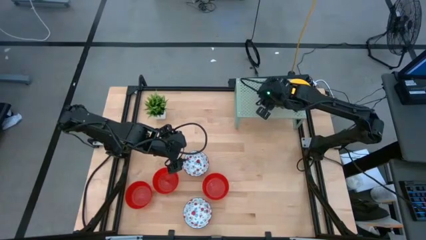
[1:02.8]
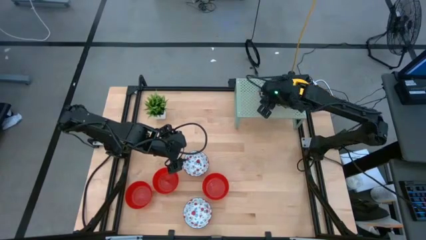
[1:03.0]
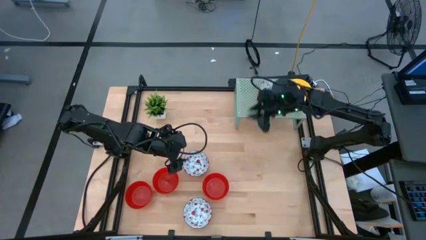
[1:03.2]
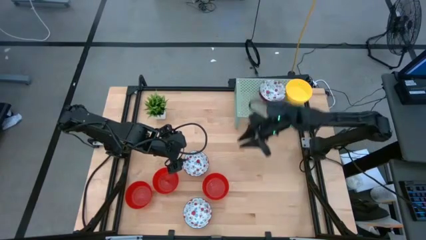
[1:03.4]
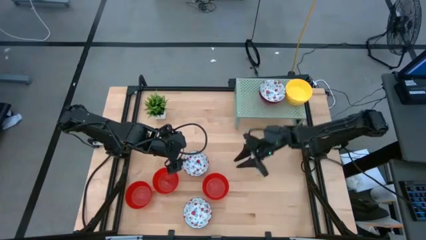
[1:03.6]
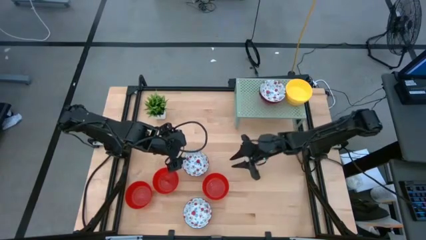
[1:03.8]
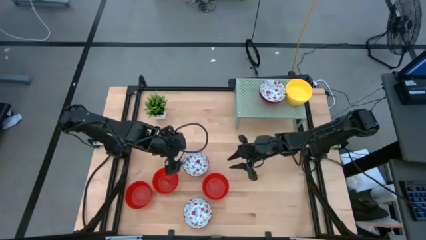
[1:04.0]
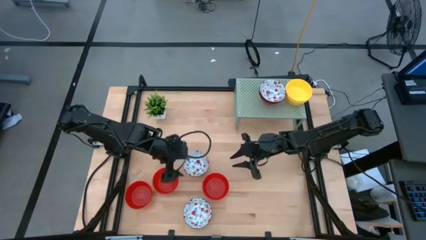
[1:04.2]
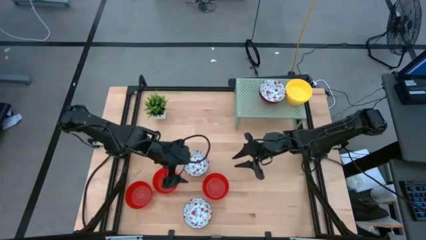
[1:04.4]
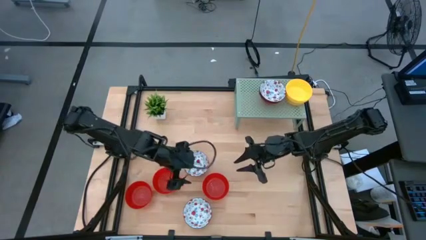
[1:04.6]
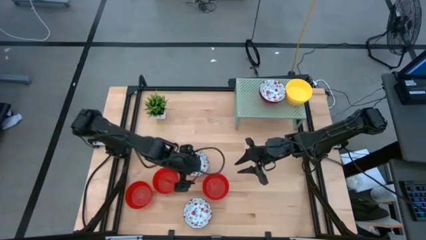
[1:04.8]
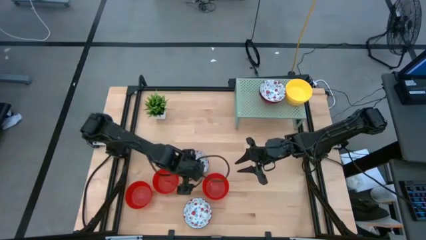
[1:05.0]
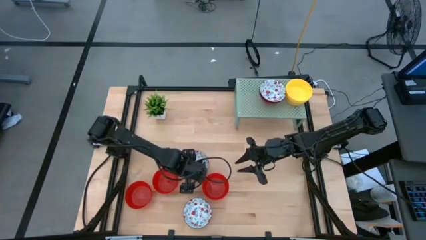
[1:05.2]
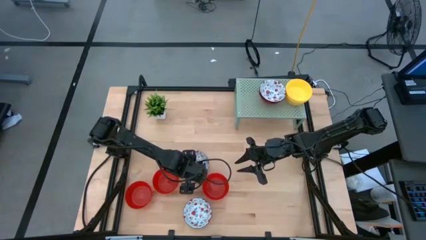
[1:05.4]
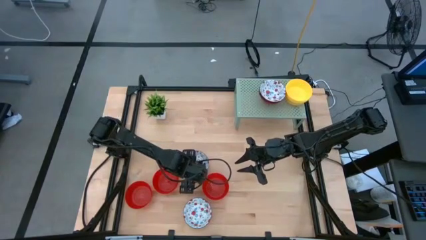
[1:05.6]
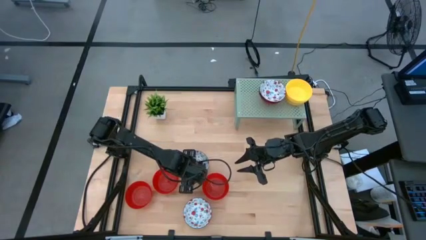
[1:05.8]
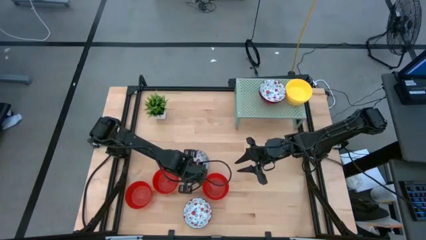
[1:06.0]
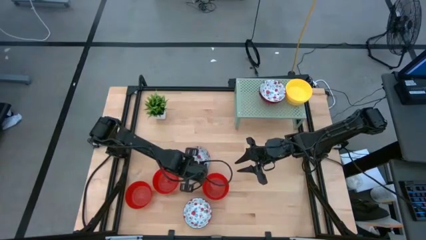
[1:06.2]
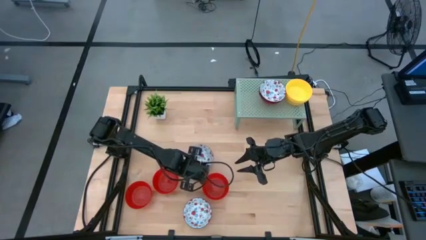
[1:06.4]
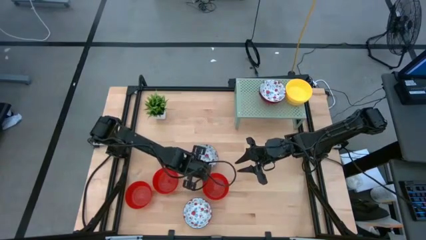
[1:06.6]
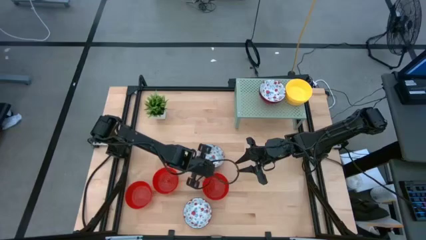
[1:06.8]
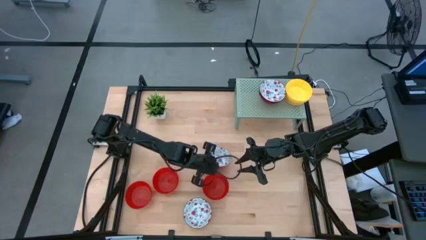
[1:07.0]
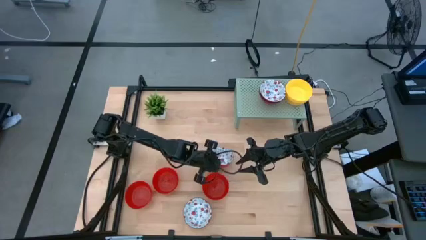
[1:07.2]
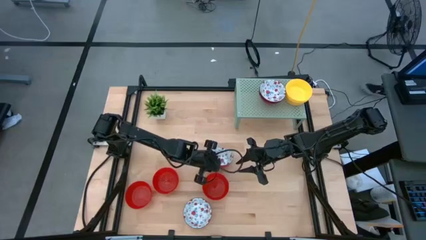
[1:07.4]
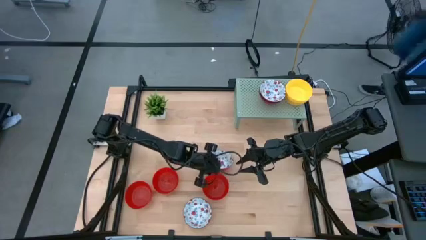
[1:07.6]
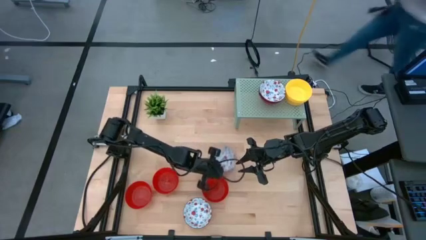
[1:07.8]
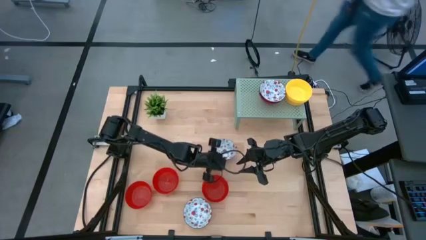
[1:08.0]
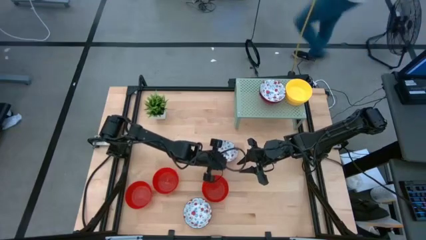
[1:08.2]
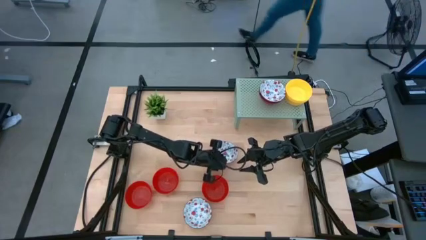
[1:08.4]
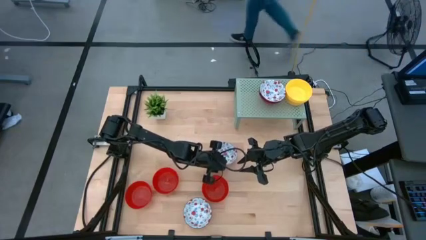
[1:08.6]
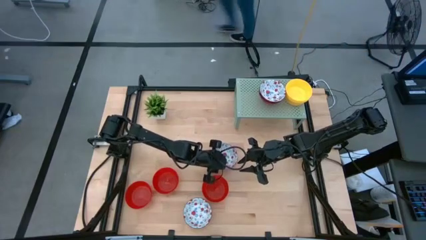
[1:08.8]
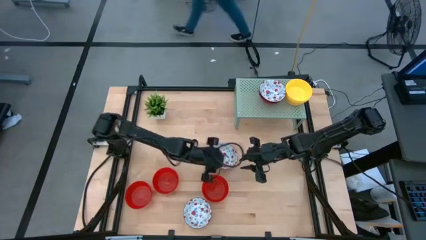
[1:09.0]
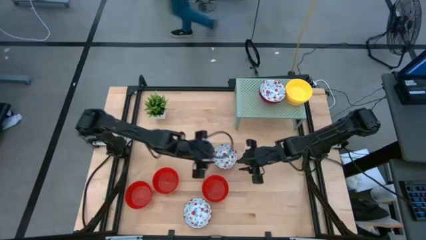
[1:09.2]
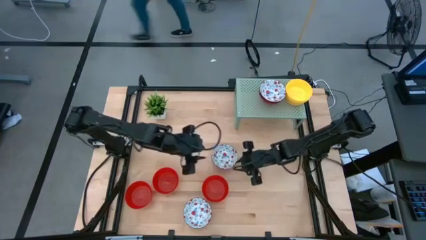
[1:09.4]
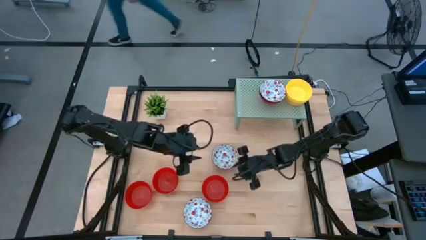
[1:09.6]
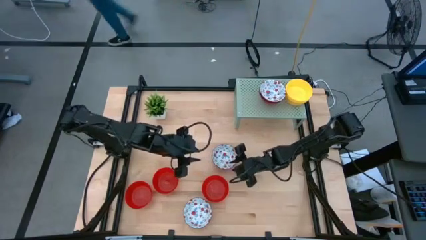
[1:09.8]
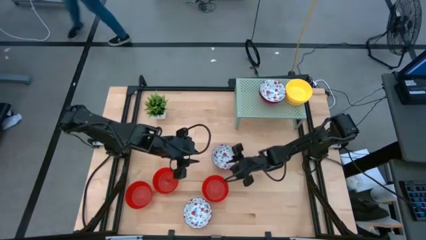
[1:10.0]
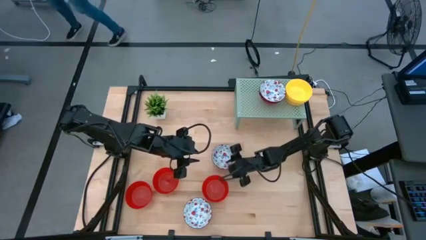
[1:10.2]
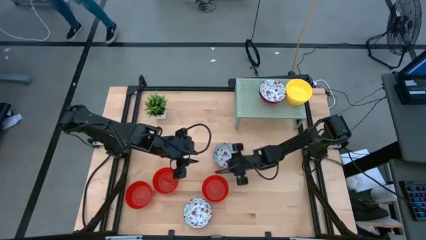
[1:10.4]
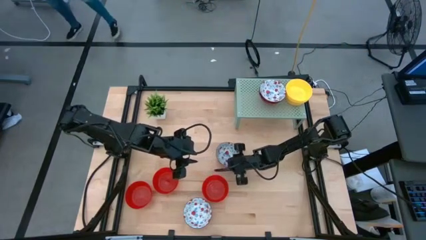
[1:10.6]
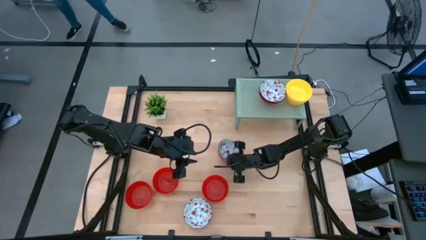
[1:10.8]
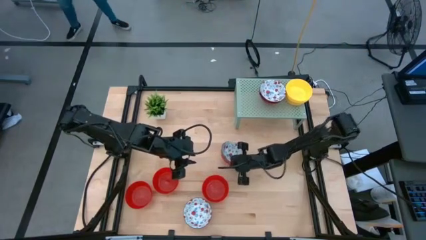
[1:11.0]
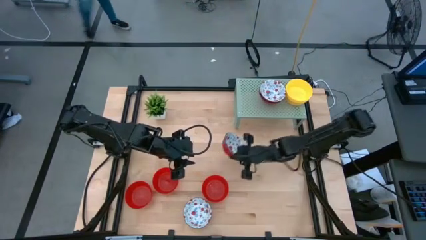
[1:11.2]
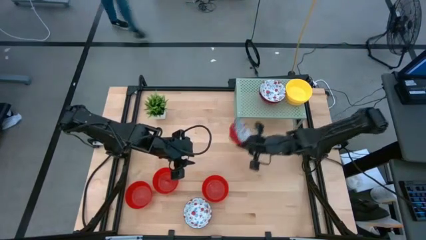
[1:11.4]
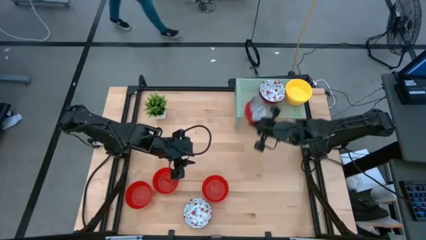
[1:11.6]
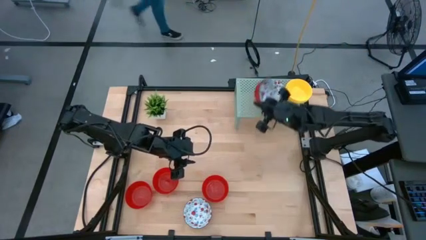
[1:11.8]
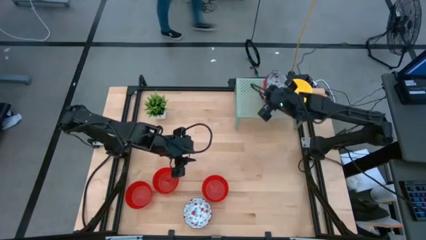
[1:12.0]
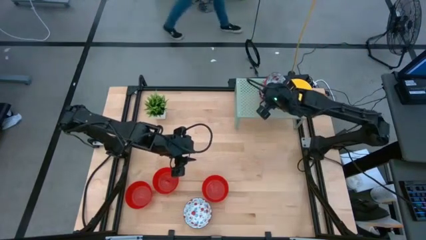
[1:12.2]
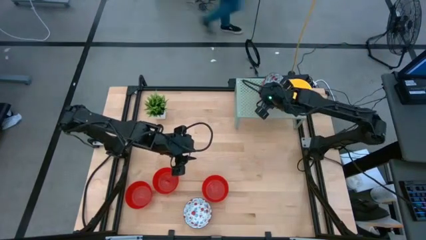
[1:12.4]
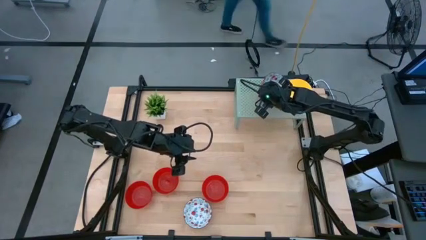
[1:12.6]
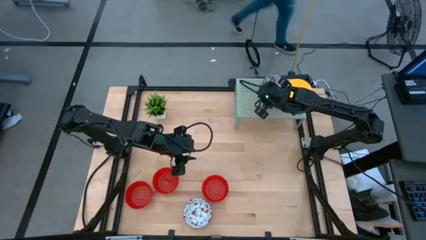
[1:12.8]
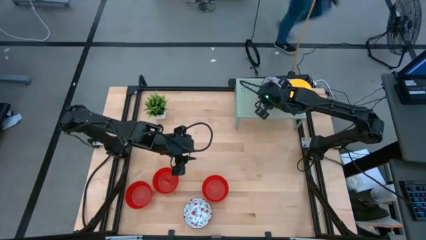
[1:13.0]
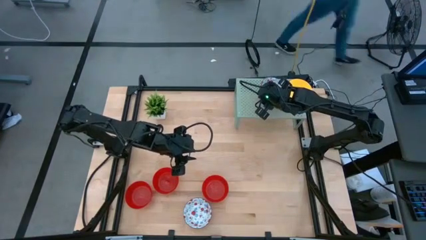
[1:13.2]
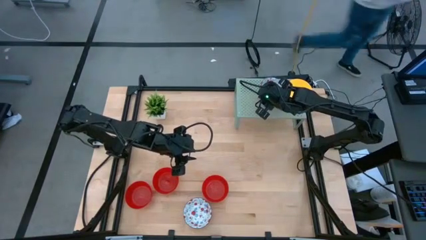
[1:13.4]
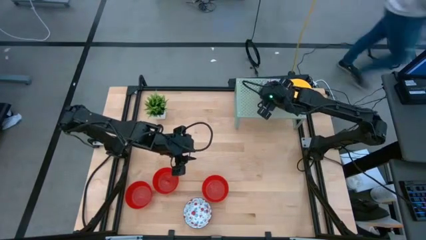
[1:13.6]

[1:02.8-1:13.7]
Task: Pick & Place Mini bowls
Stack the white pattern bowl on the stacked white pattern bowl on the shelf

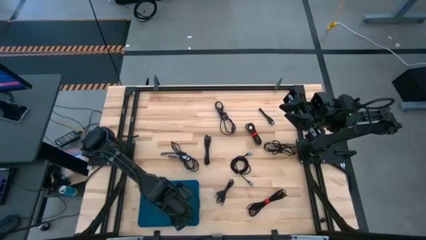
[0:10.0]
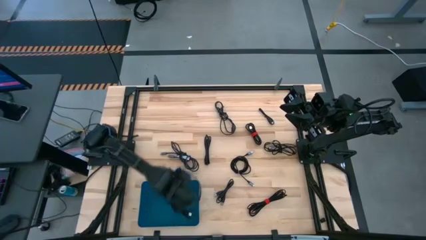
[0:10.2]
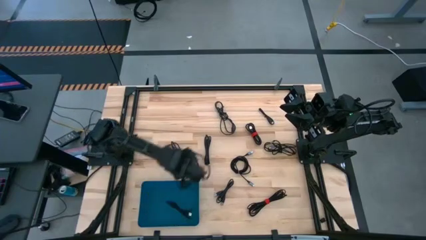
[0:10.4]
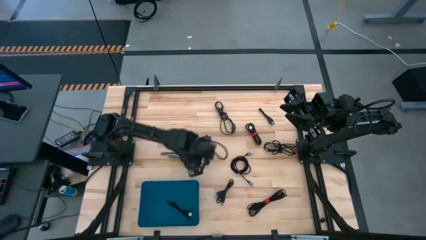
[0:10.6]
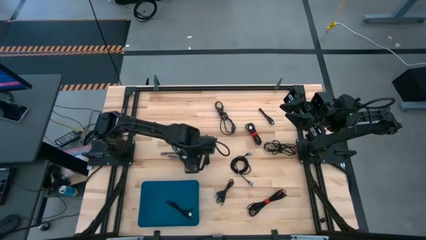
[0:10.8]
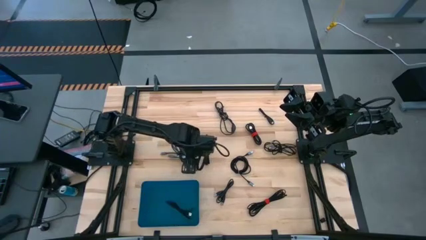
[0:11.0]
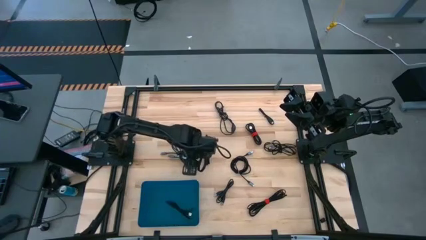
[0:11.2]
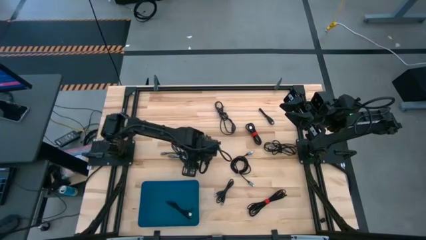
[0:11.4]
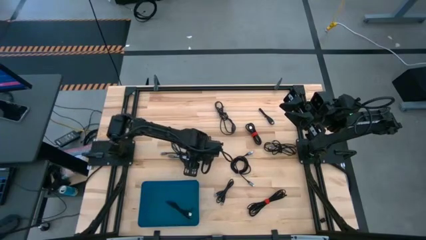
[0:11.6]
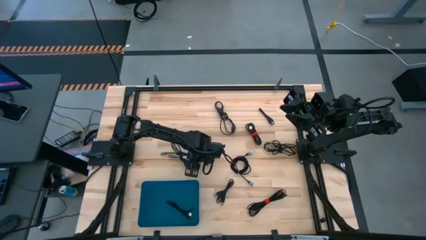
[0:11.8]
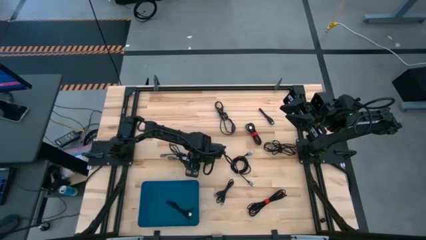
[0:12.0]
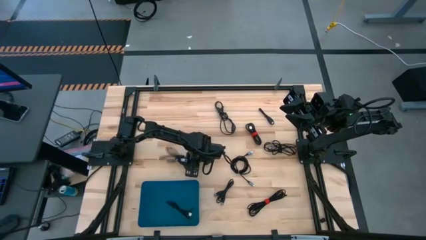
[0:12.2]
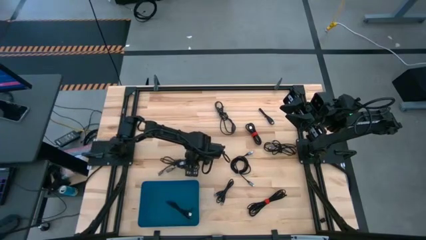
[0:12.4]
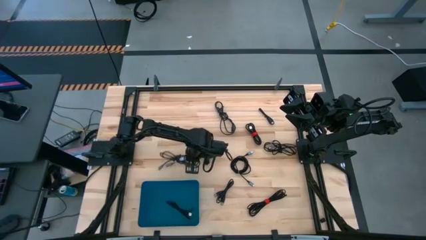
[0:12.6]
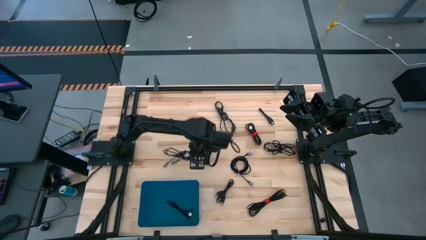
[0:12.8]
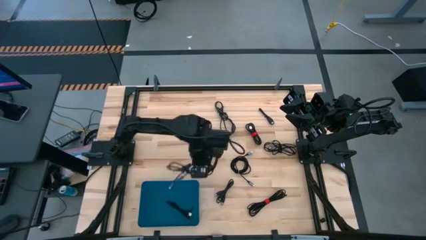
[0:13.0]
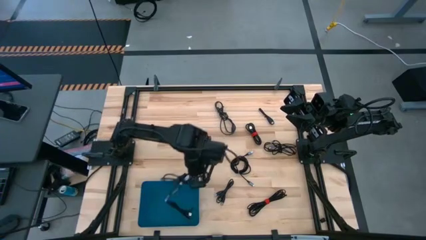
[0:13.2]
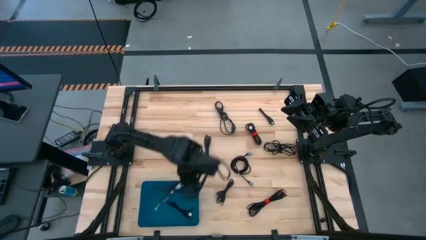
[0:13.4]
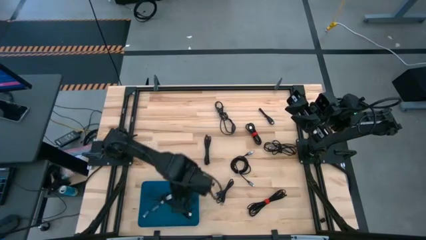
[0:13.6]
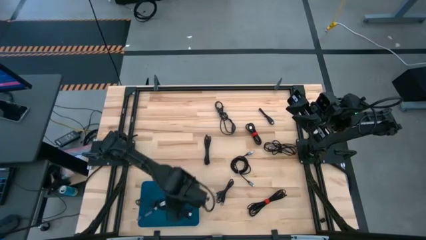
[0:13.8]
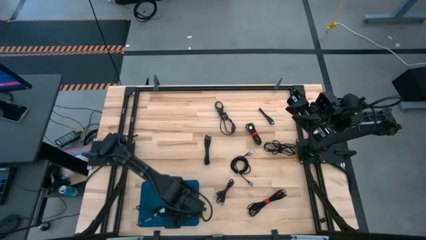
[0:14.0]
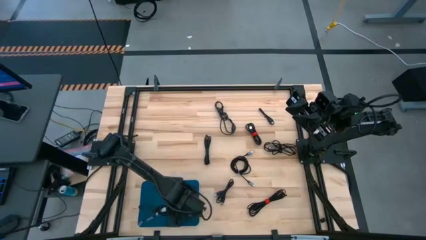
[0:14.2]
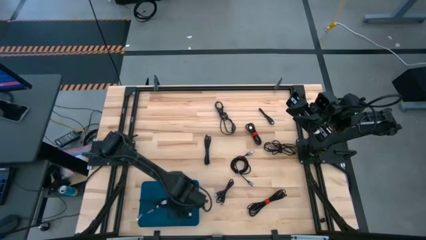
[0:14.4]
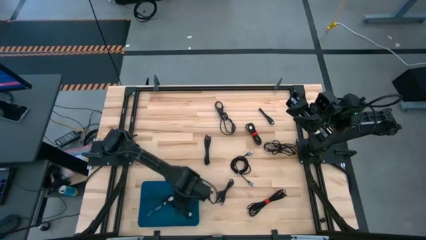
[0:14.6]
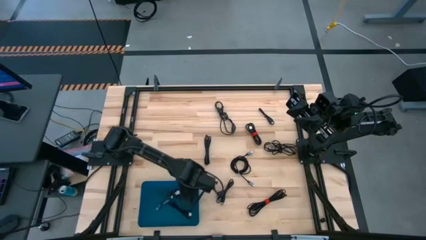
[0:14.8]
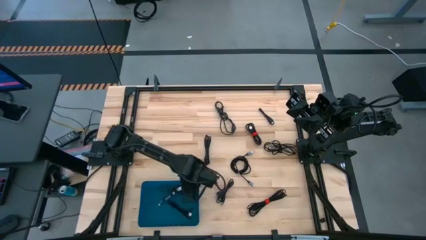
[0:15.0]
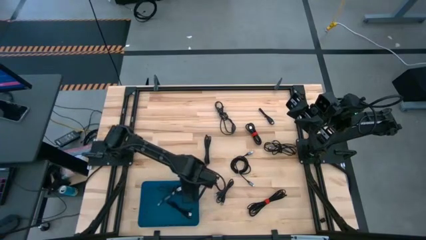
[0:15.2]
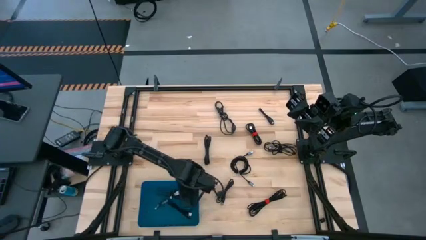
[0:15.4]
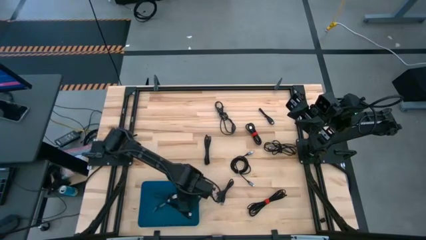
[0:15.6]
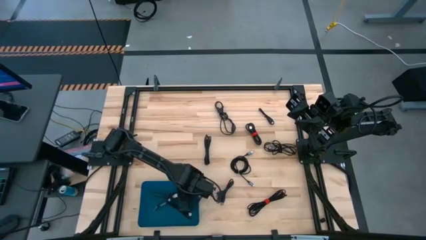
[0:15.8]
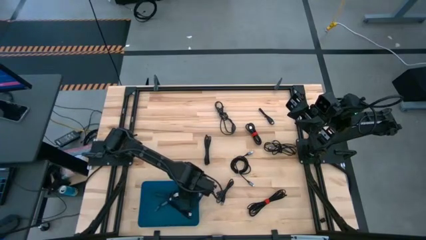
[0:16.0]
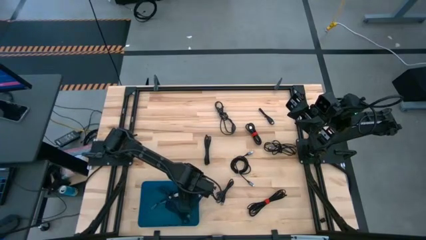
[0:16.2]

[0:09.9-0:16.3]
Task: Pick and place USB-C Cables
Put the black charger cable into the blue bin
